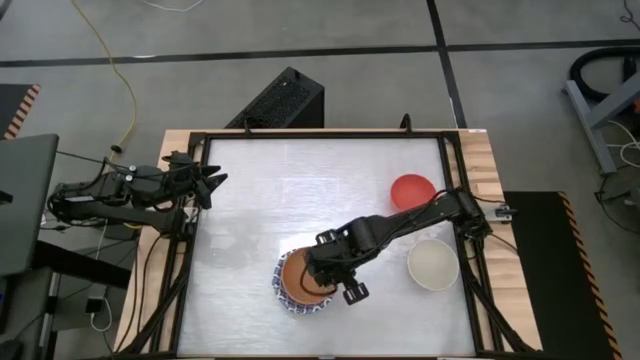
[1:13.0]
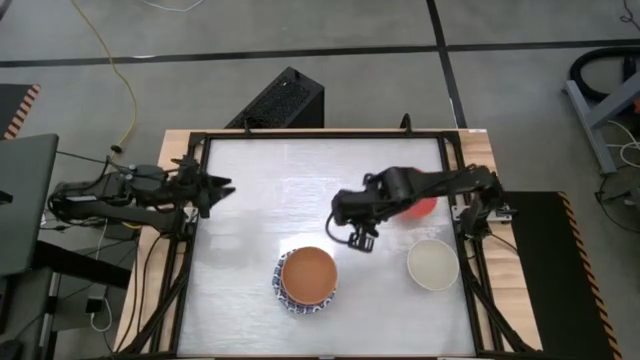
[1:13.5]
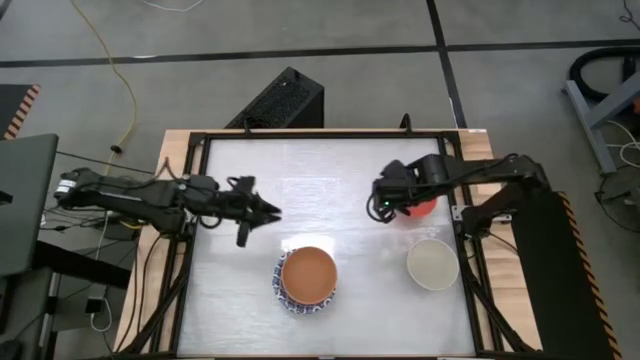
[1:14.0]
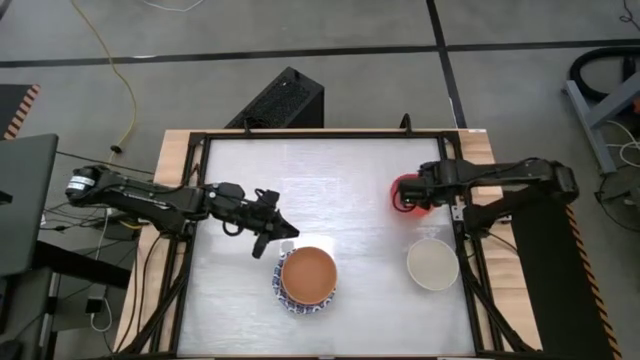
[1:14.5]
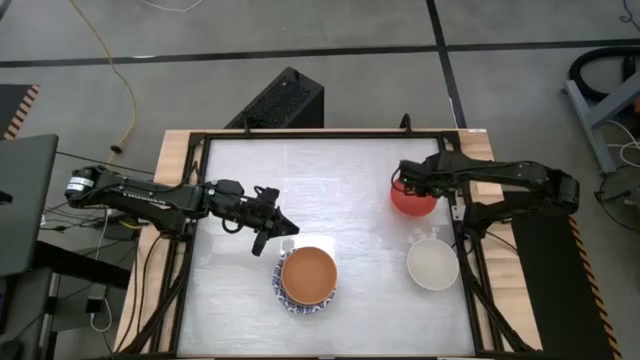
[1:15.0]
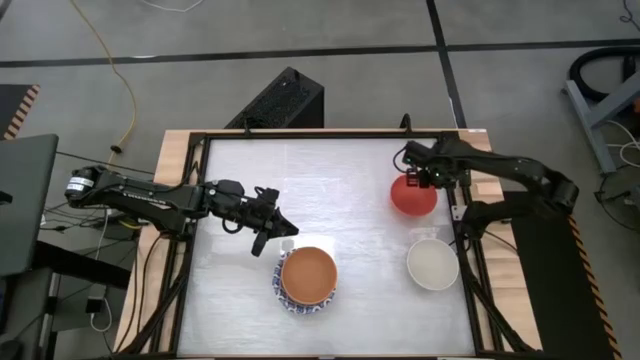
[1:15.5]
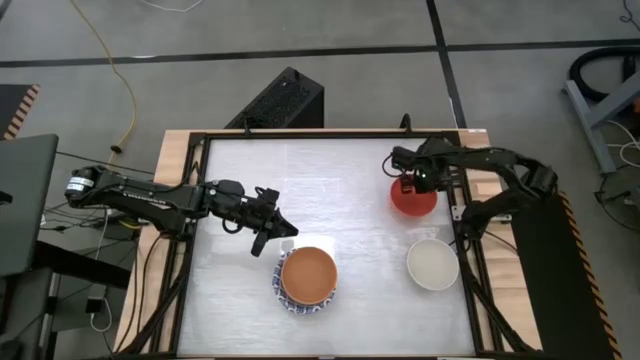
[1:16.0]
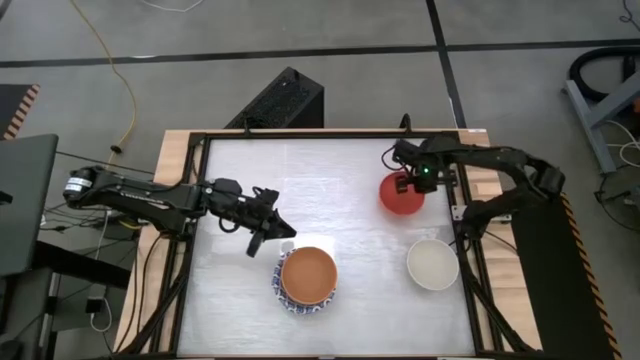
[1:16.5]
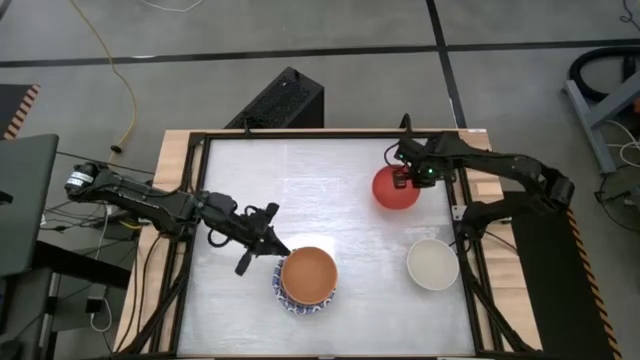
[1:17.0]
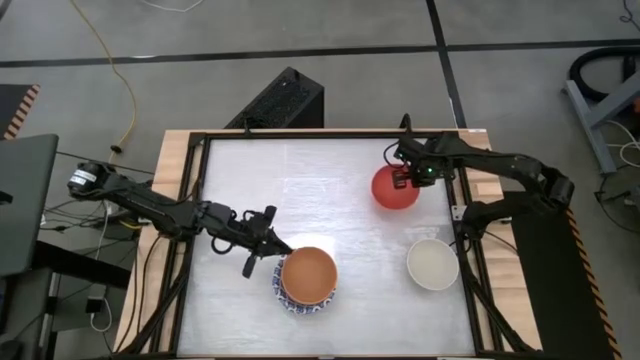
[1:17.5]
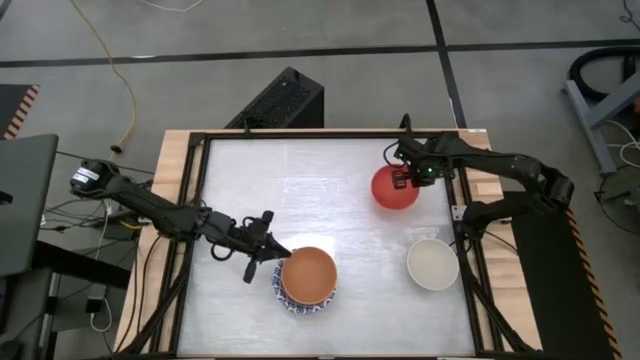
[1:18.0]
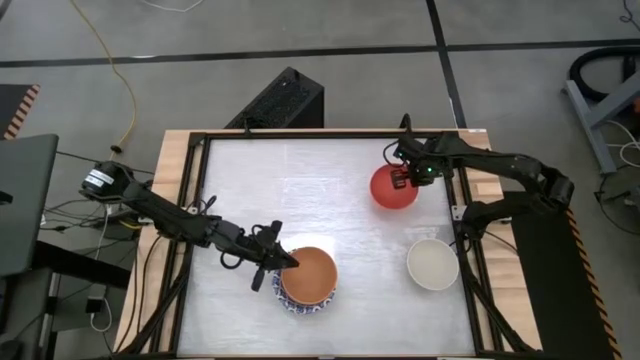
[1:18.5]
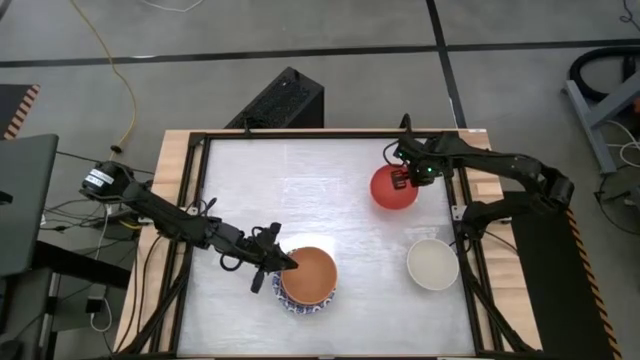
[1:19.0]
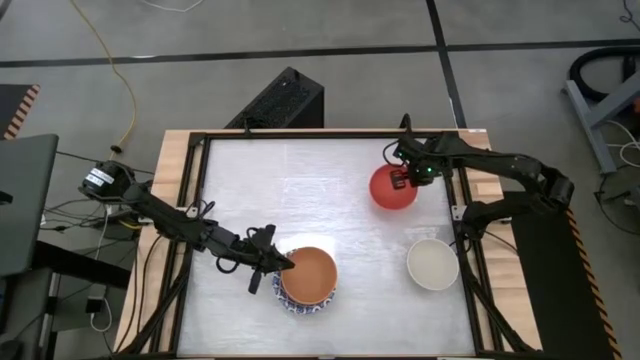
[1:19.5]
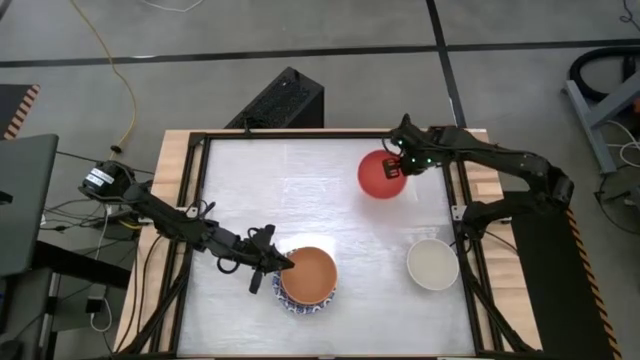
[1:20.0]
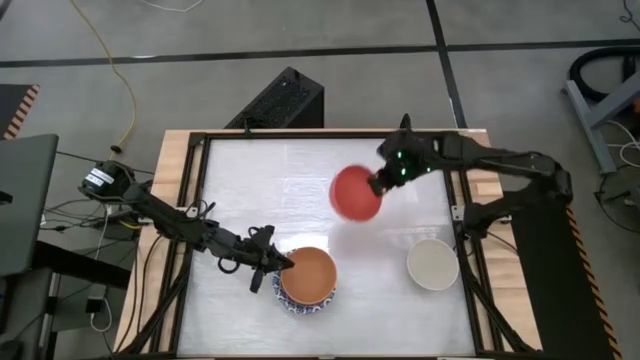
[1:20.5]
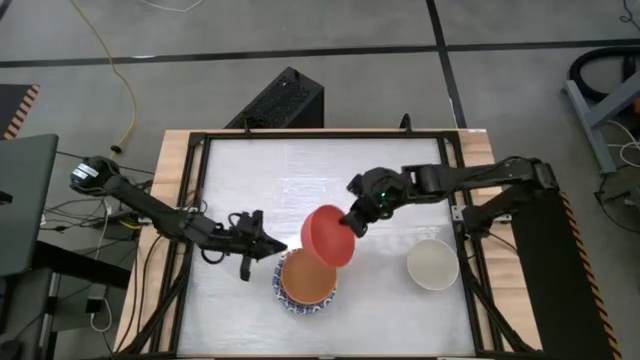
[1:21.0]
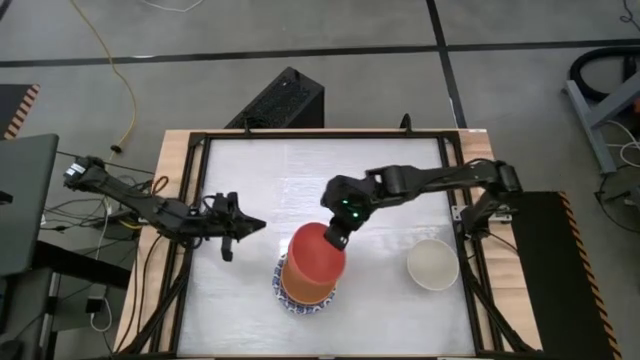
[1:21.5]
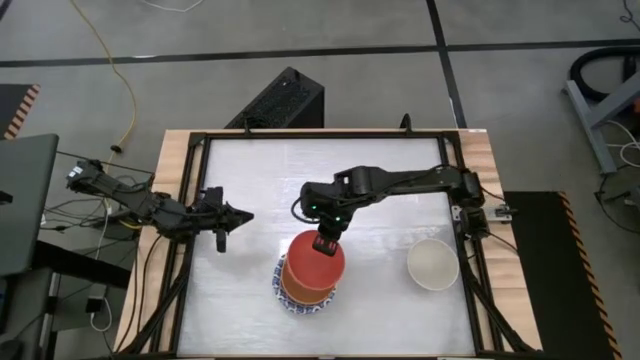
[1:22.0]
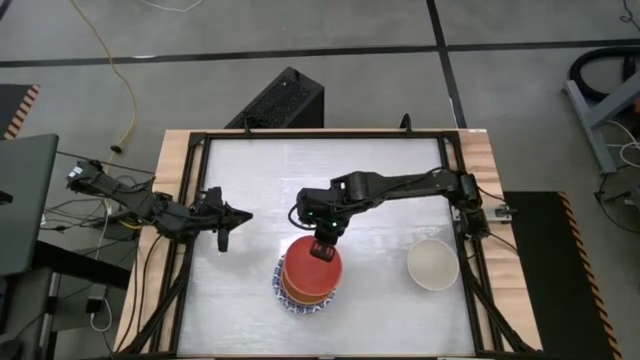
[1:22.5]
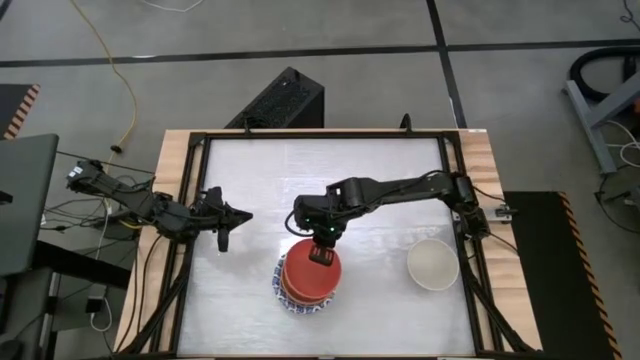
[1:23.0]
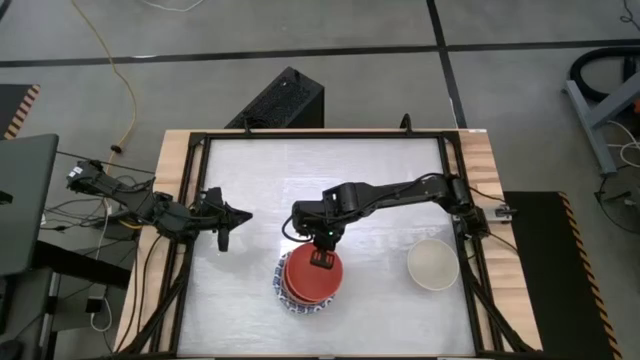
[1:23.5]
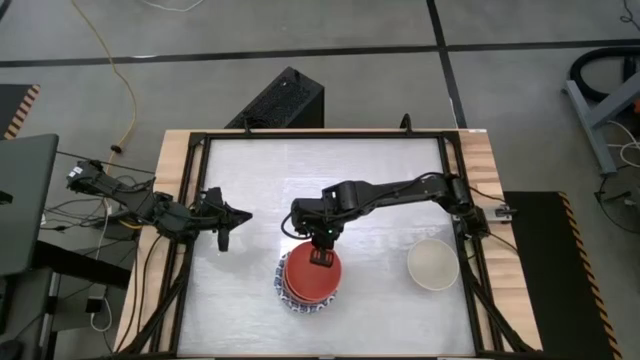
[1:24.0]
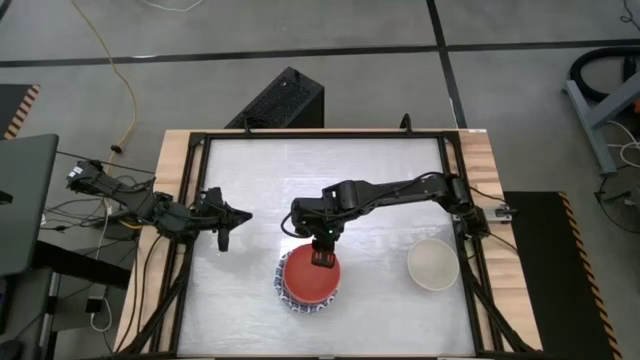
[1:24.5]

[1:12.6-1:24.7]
Stack the orange bowl into the yellow bowl

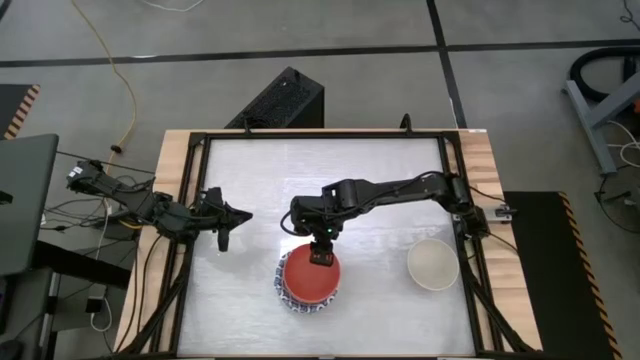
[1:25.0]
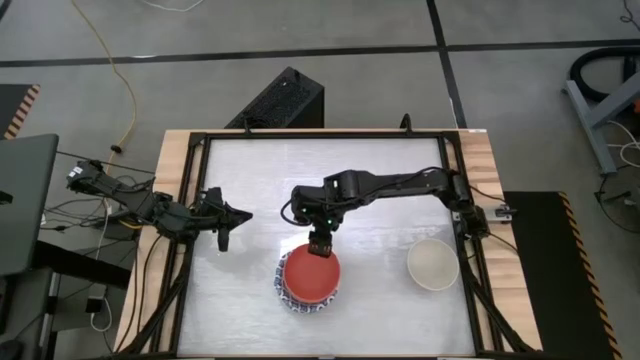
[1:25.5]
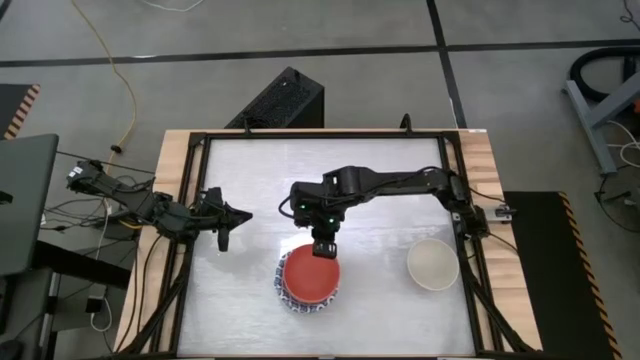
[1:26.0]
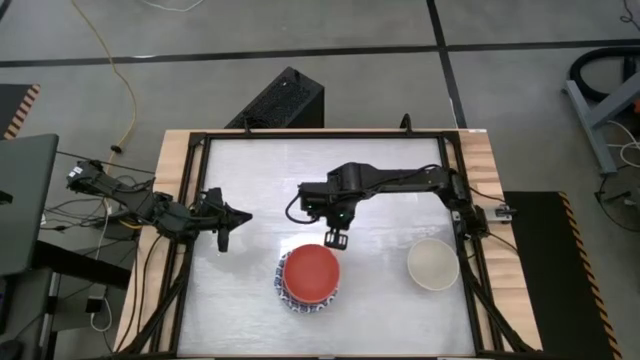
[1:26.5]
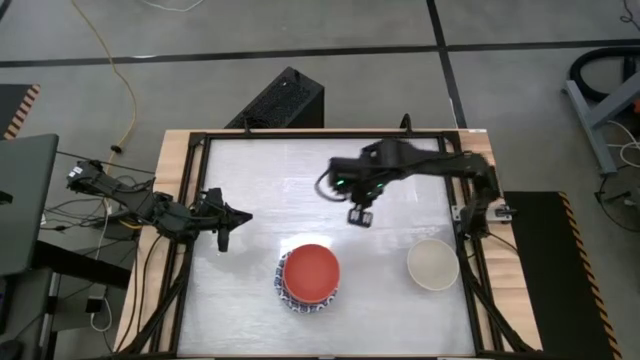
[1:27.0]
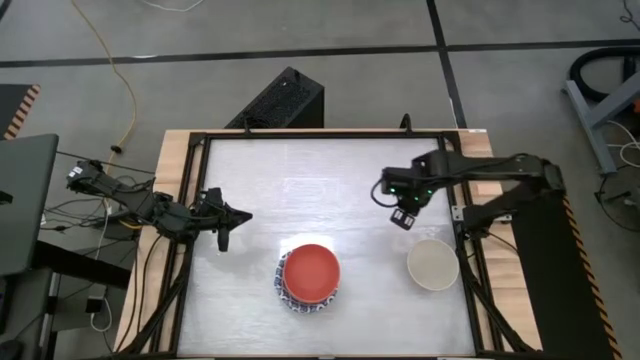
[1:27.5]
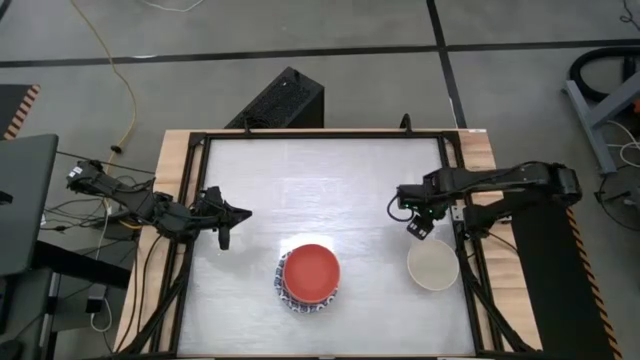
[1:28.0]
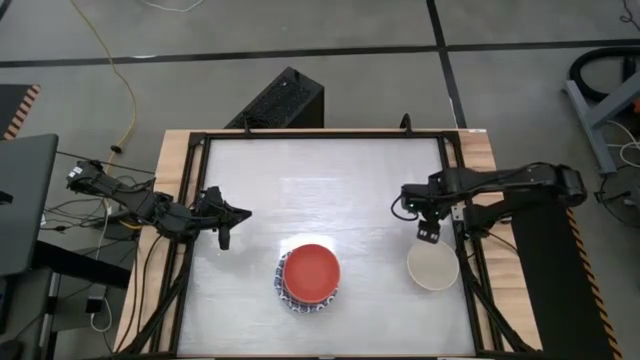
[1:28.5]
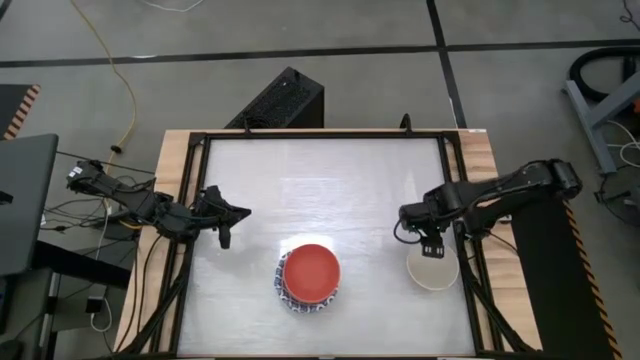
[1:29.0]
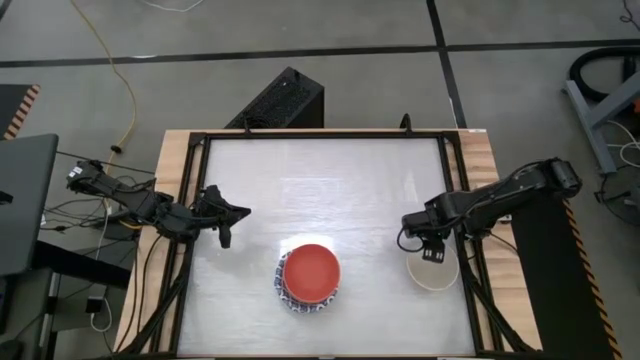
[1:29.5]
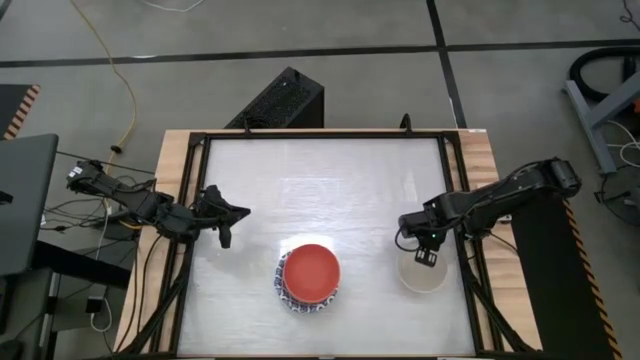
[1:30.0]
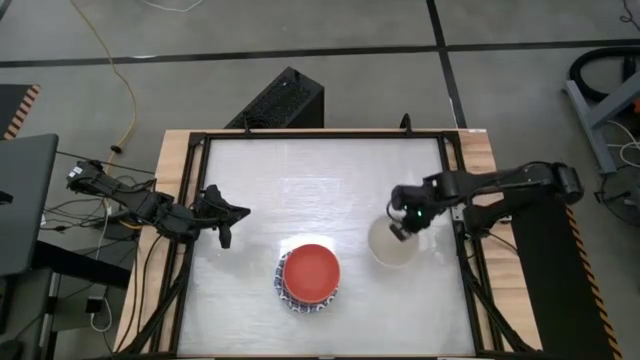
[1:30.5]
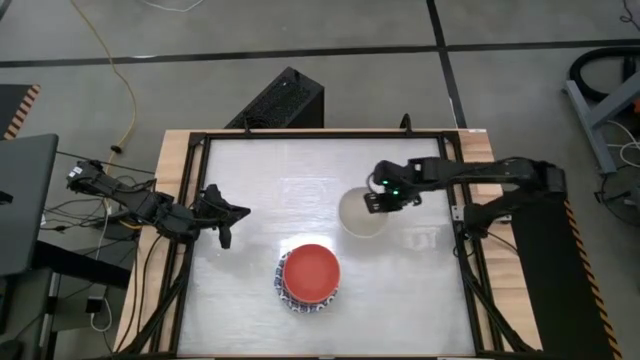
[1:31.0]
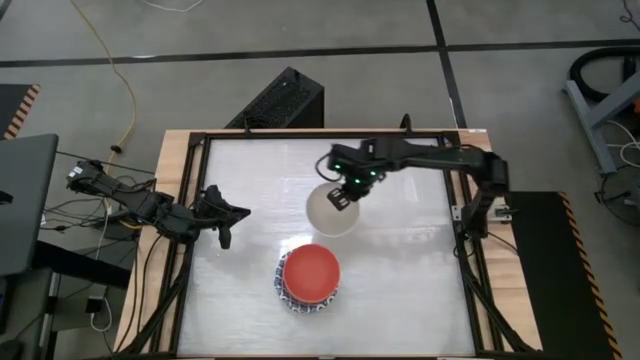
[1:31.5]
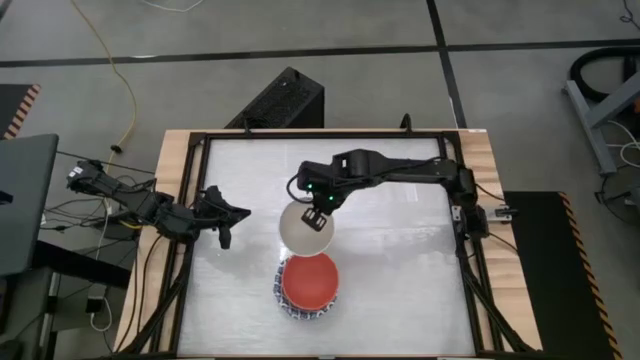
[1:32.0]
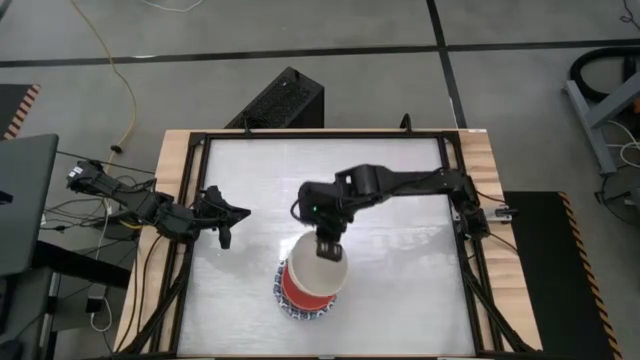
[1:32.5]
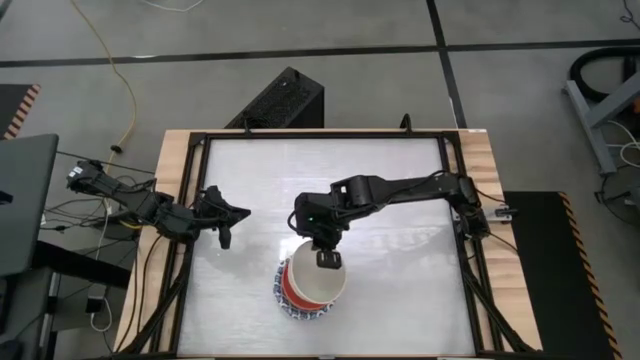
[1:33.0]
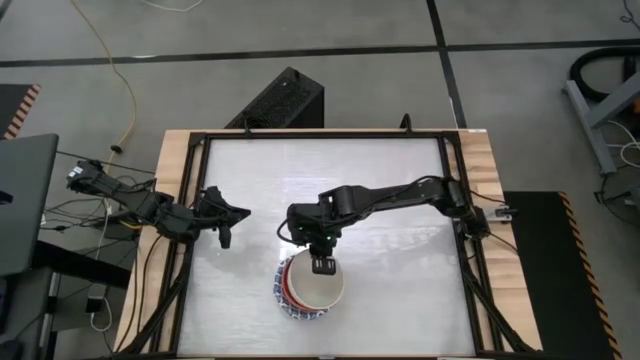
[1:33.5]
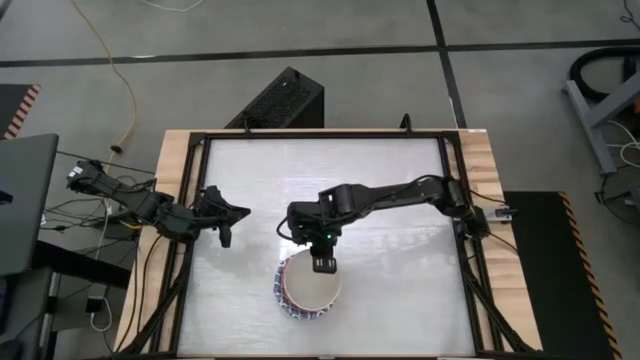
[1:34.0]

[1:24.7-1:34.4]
Stack the white bowl into the orange bowl
